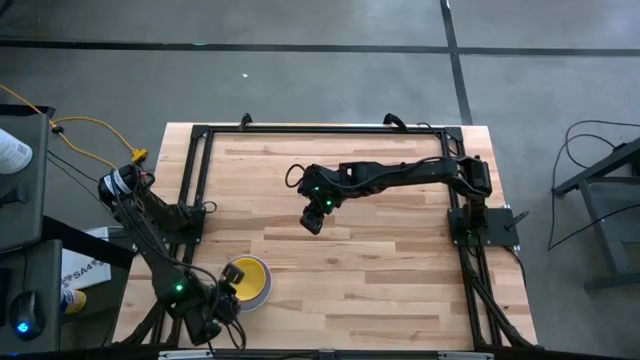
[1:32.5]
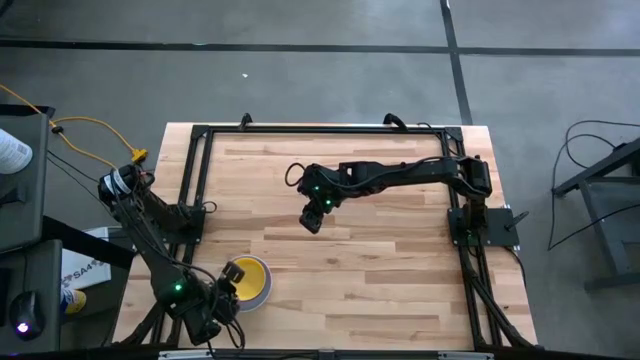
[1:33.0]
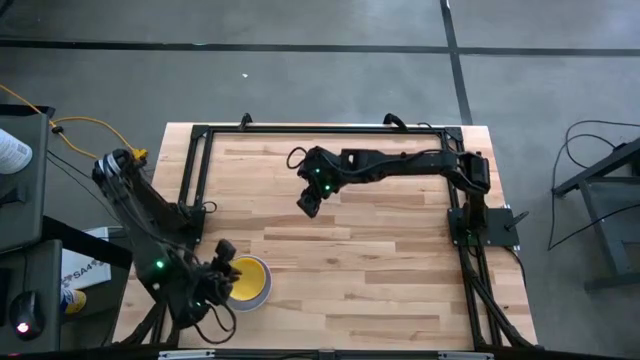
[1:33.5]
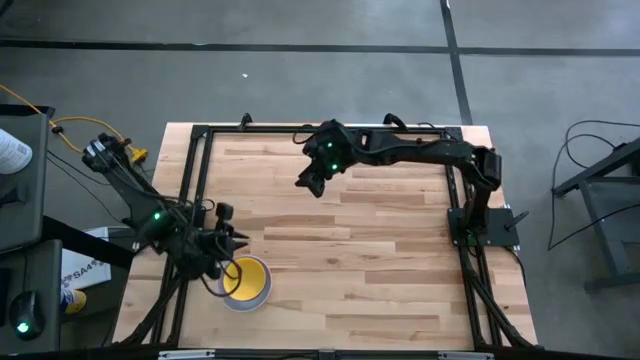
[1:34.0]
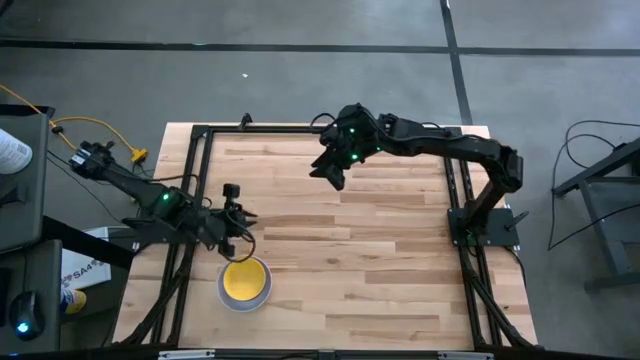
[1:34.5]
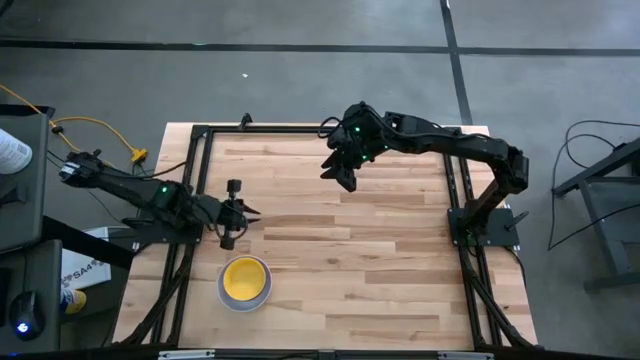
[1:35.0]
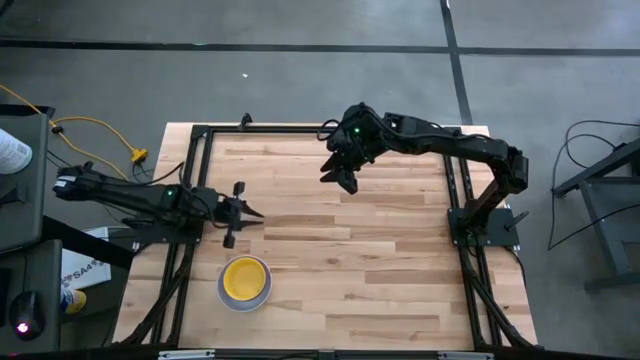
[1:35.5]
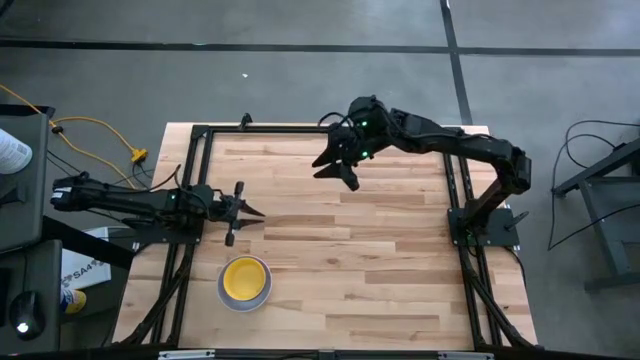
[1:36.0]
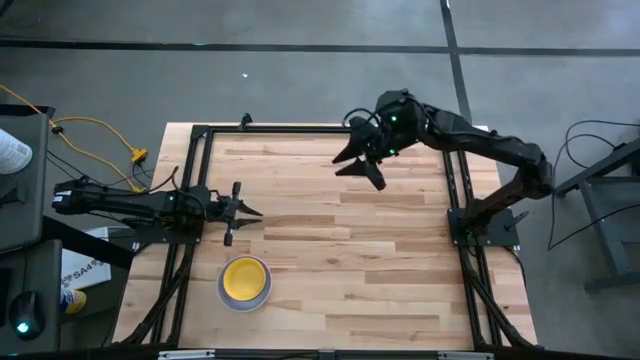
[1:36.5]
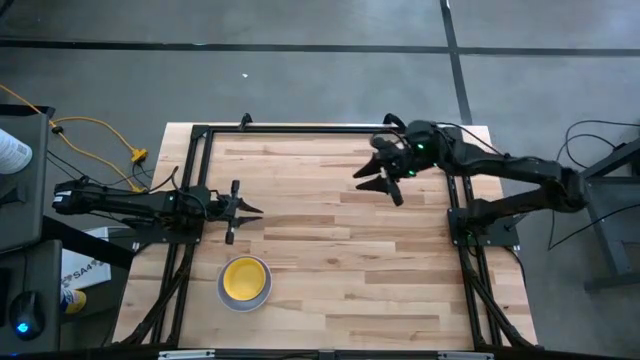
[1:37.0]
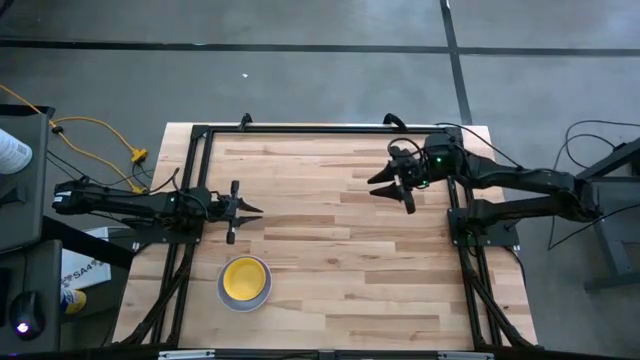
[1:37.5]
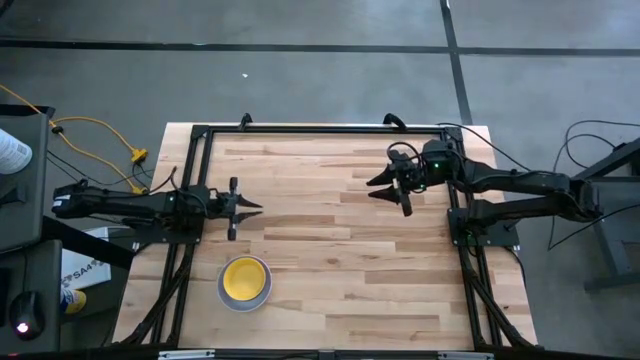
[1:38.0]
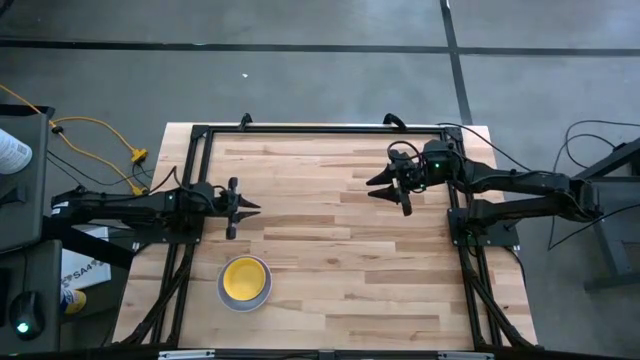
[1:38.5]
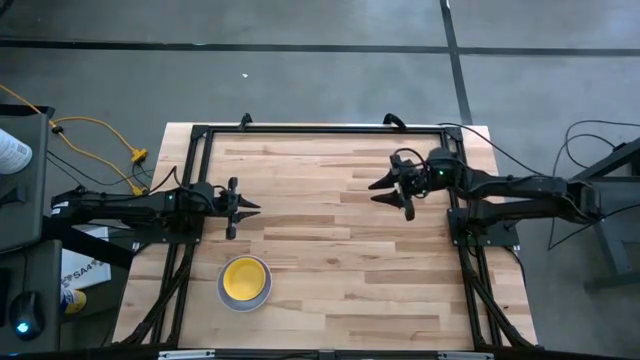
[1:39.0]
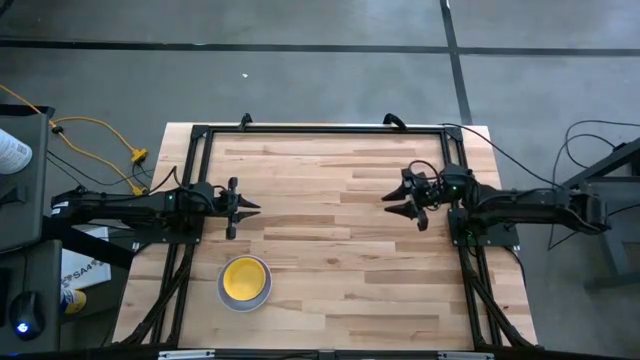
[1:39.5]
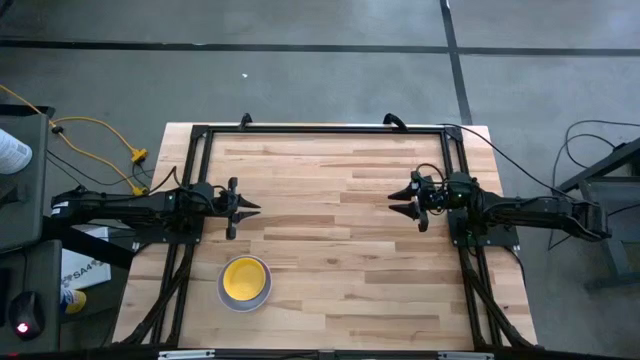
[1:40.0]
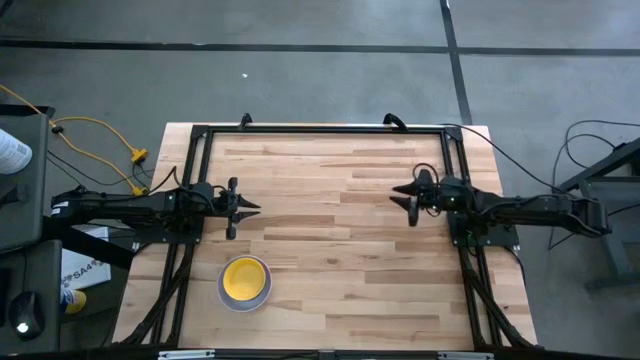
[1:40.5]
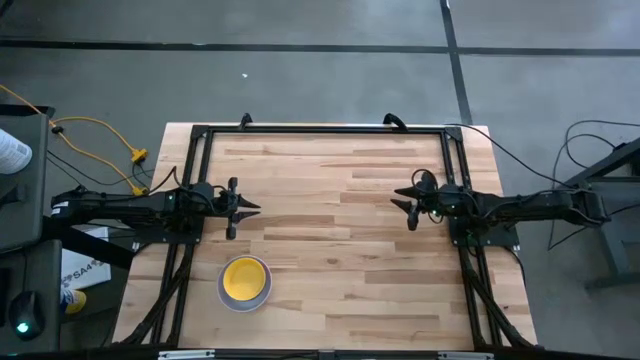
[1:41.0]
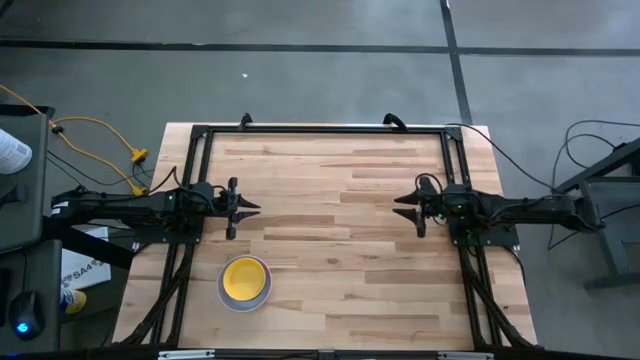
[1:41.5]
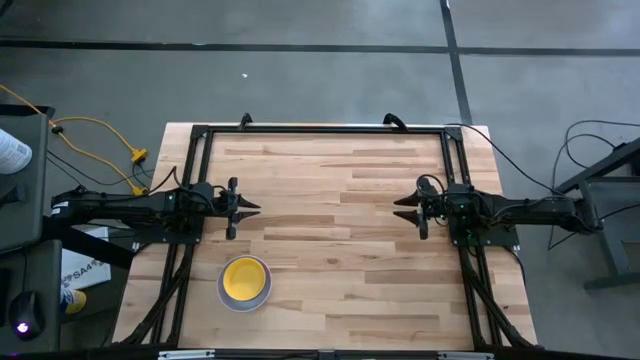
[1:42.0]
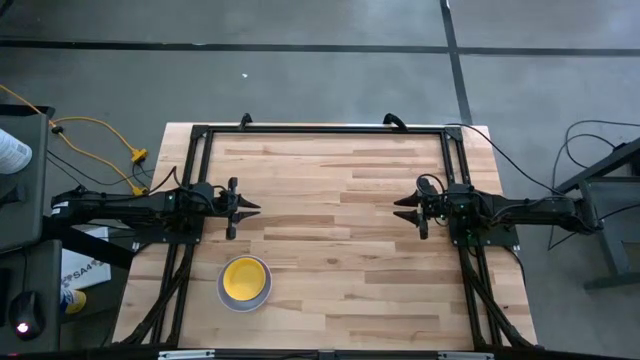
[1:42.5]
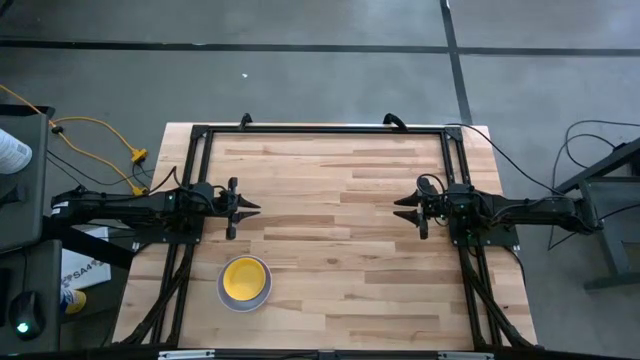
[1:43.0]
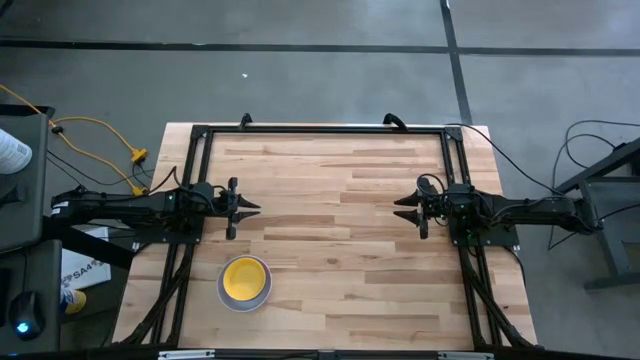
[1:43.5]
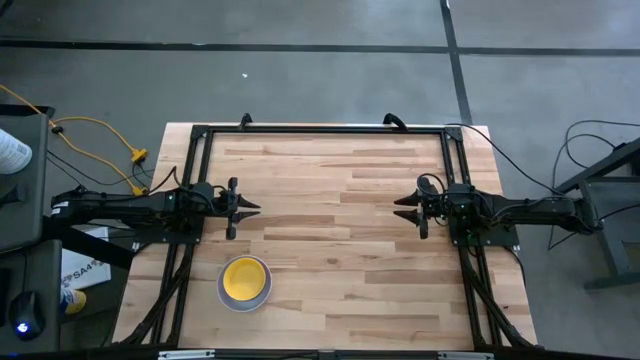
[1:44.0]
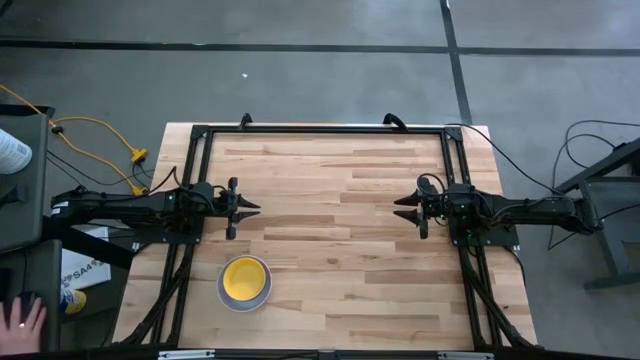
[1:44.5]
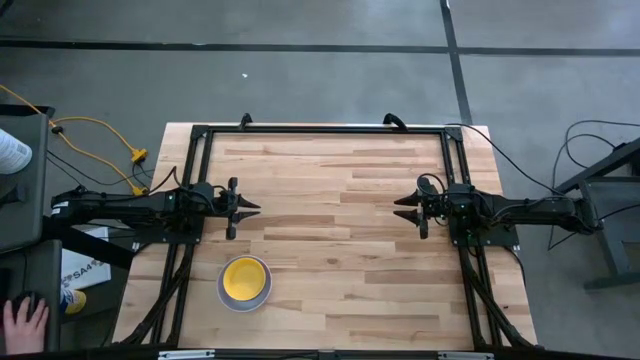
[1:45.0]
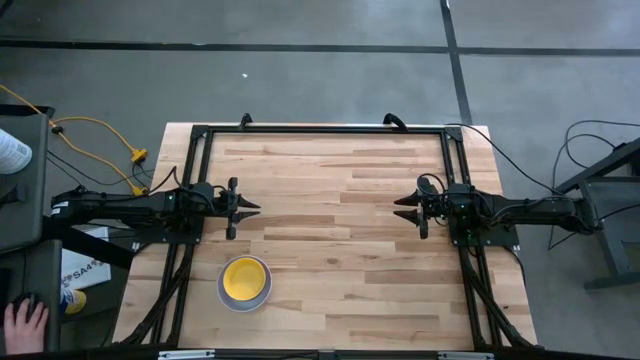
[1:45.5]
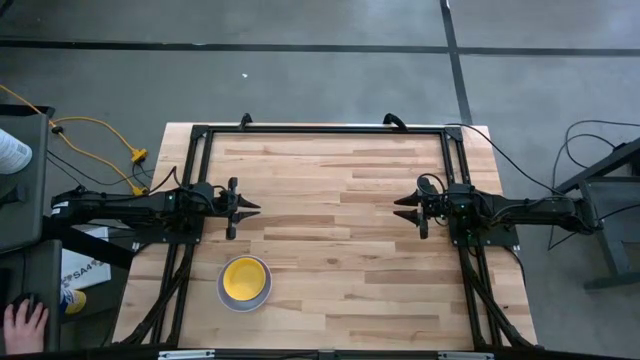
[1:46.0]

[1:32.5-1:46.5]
Return to Home Position
